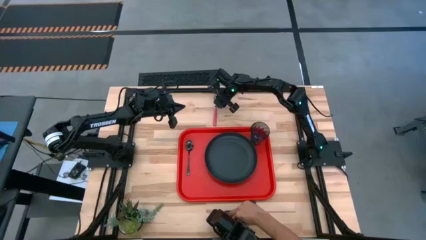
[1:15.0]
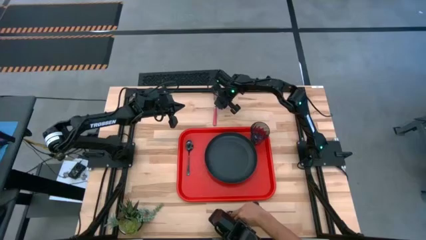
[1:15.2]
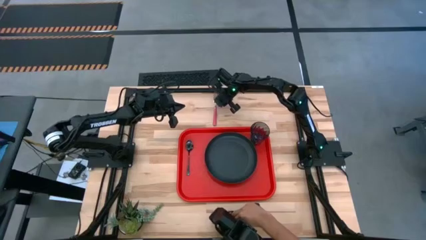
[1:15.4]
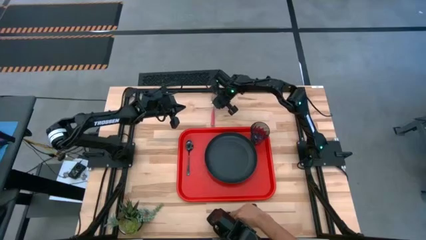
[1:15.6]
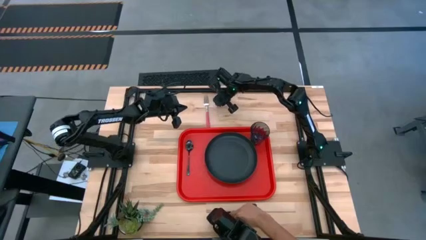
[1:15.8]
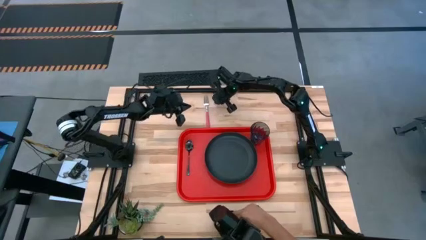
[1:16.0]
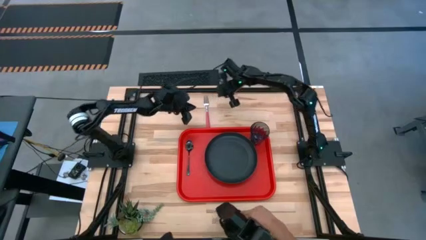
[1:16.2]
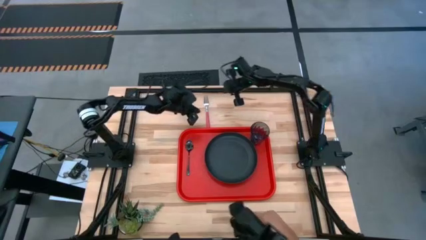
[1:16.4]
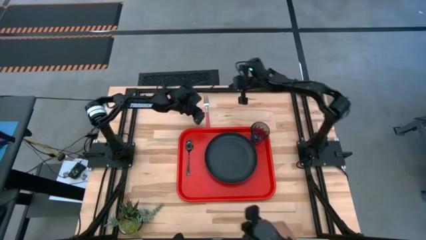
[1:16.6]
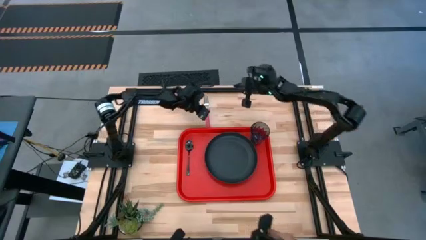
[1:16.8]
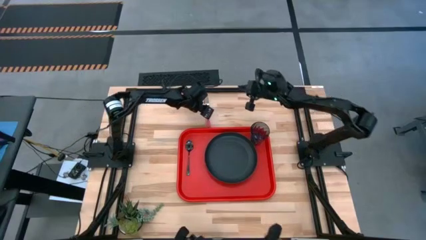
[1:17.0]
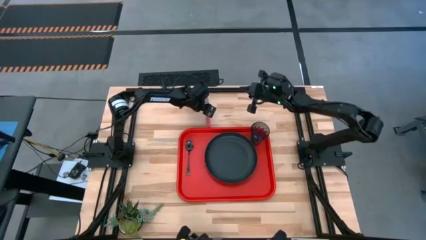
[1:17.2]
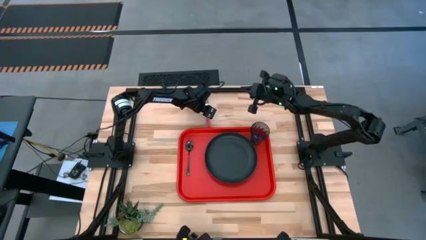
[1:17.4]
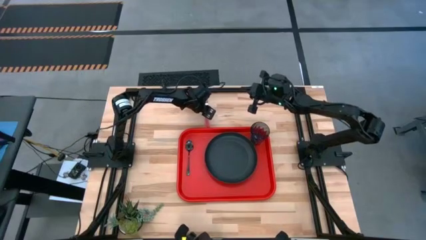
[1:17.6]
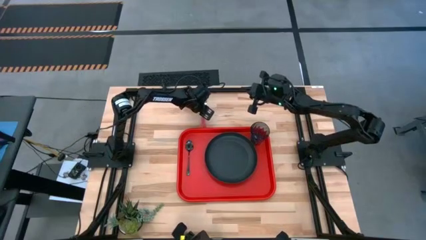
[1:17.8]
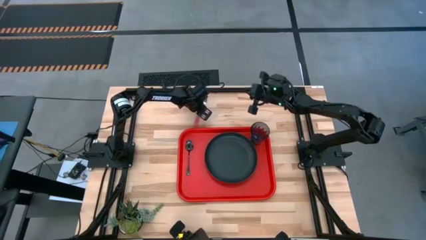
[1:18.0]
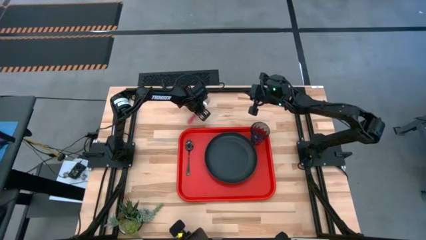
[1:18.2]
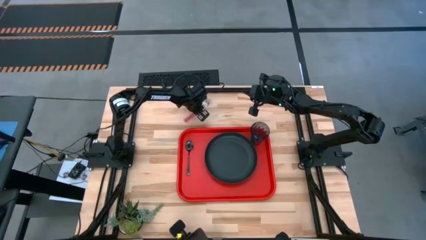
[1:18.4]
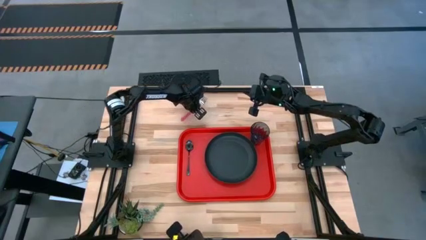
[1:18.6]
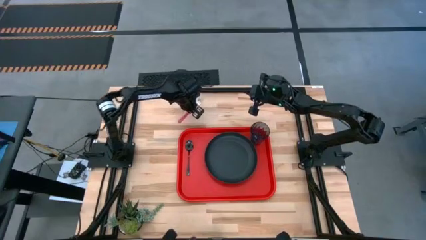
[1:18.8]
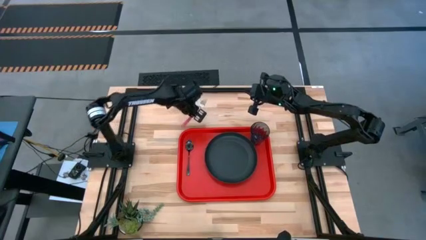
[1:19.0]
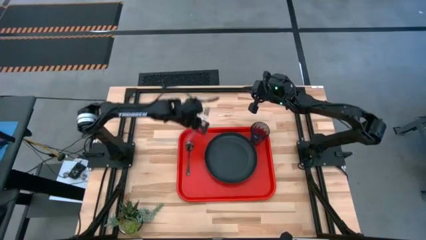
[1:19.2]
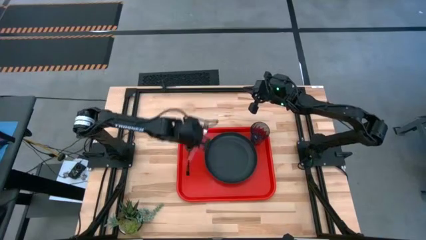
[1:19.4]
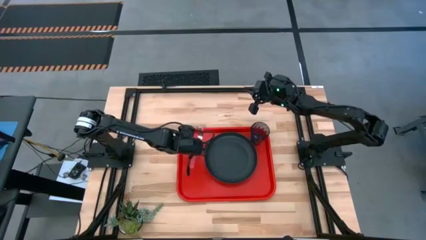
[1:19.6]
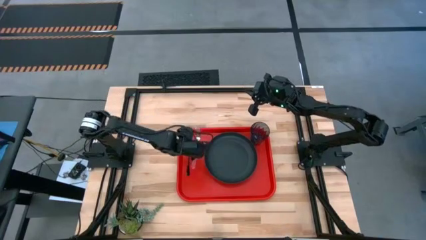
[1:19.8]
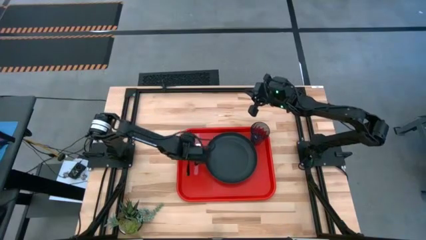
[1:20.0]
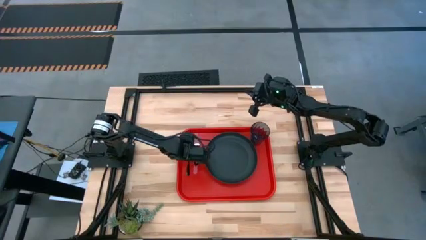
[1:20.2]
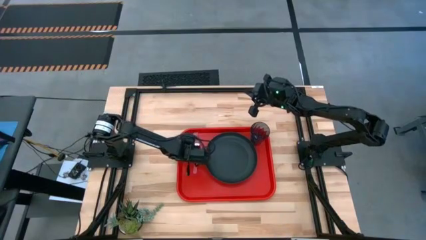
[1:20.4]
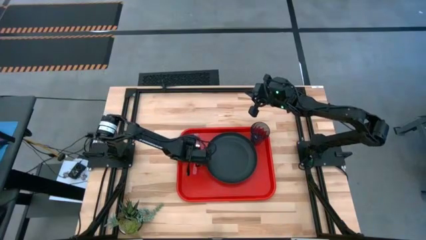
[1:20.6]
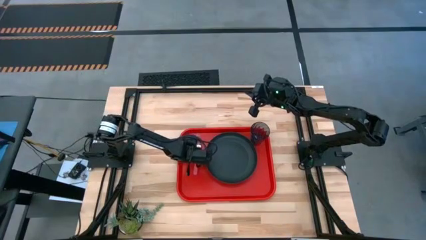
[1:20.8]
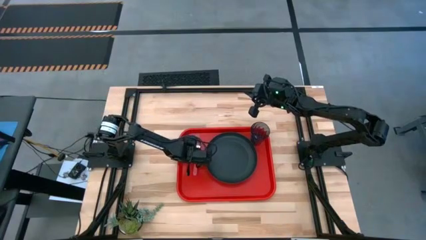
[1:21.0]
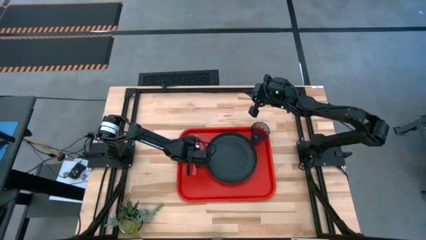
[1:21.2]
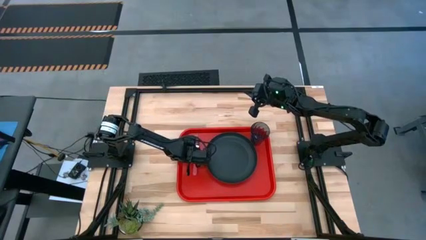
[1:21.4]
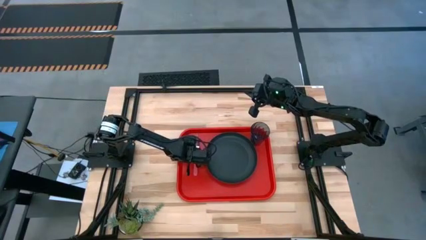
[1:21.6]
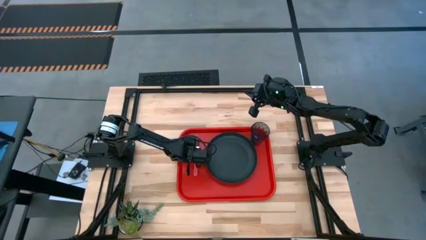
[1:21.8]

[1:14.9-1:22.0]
Task: Pick and place plate/cup/fork/spoon on tray
Put the pink fork on the red serving tray to the left of the black plate

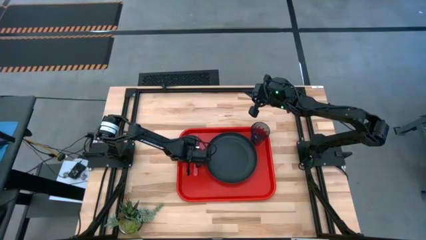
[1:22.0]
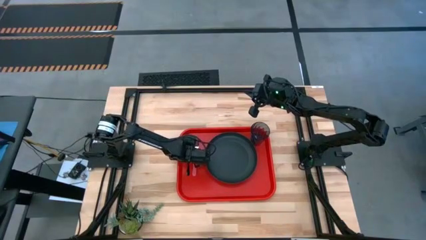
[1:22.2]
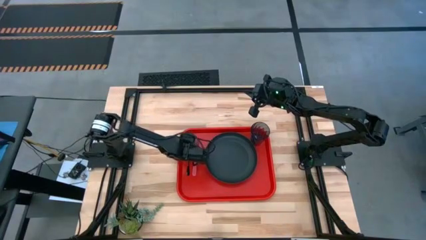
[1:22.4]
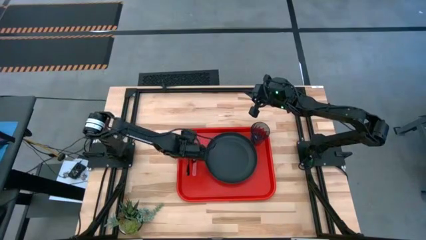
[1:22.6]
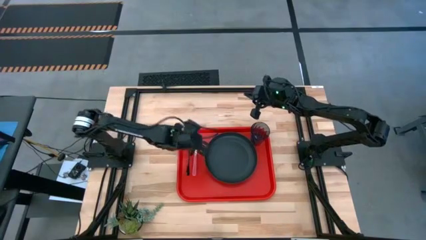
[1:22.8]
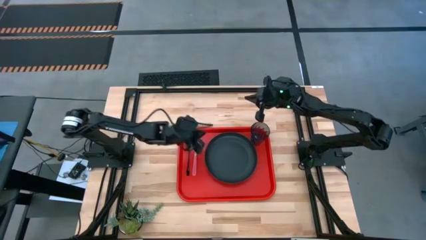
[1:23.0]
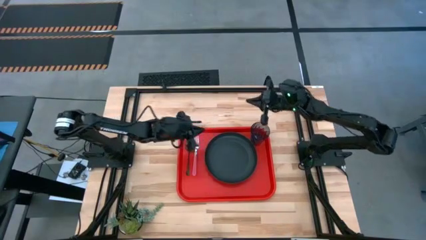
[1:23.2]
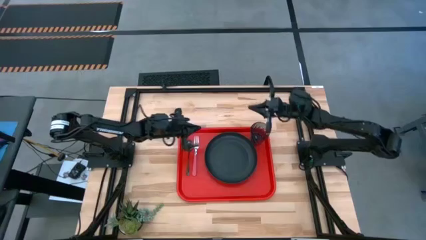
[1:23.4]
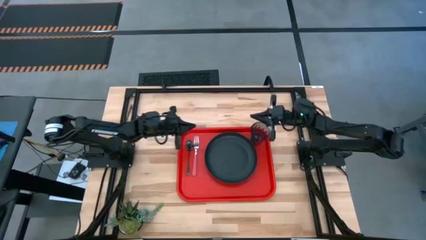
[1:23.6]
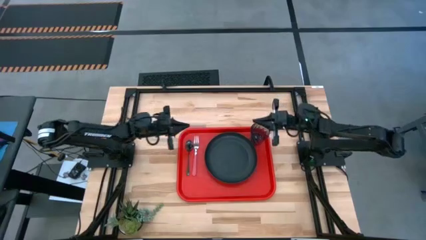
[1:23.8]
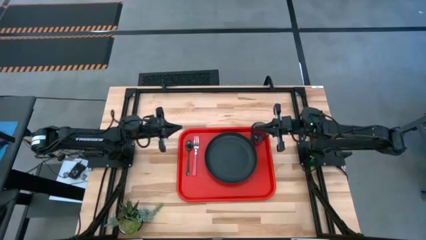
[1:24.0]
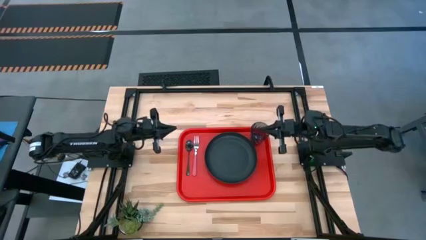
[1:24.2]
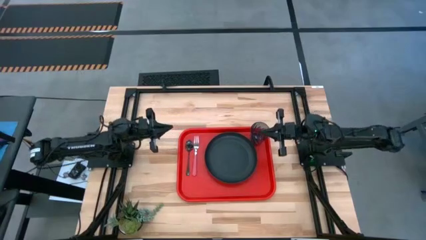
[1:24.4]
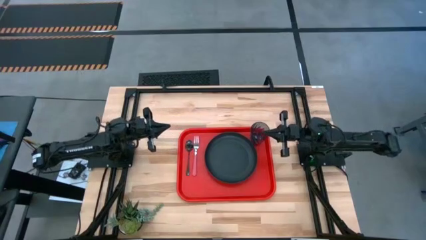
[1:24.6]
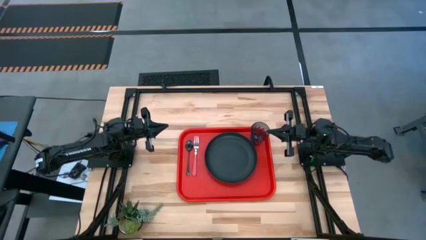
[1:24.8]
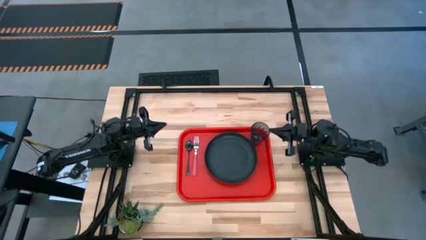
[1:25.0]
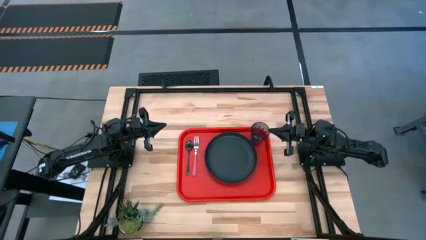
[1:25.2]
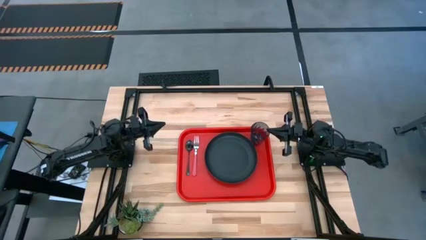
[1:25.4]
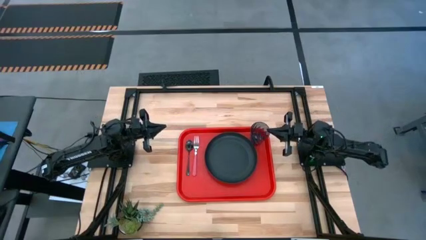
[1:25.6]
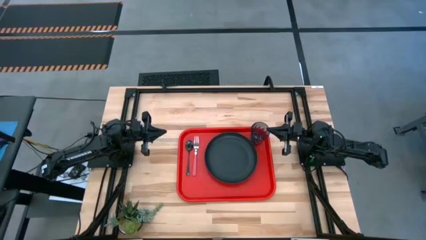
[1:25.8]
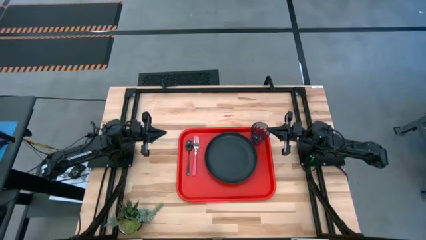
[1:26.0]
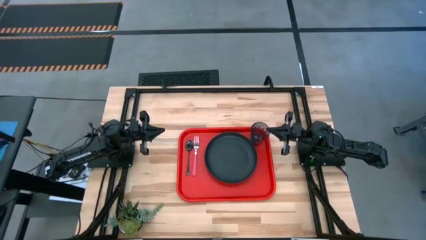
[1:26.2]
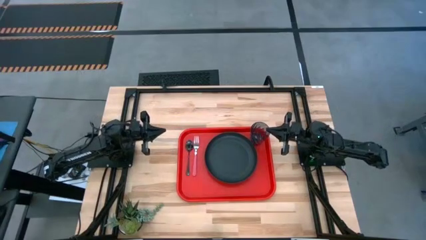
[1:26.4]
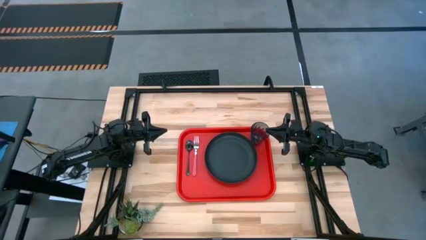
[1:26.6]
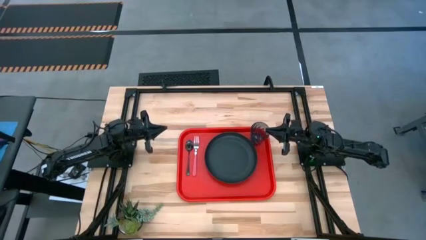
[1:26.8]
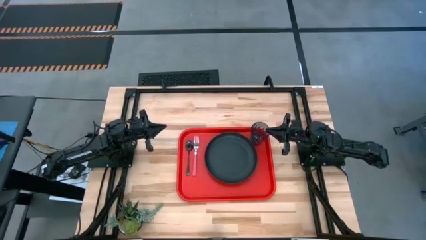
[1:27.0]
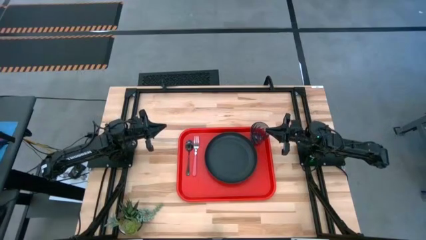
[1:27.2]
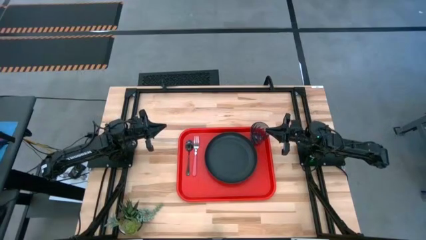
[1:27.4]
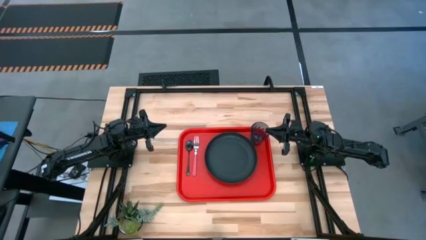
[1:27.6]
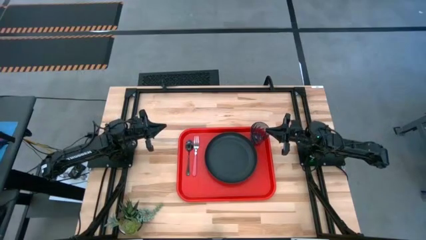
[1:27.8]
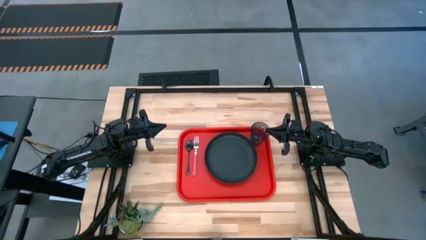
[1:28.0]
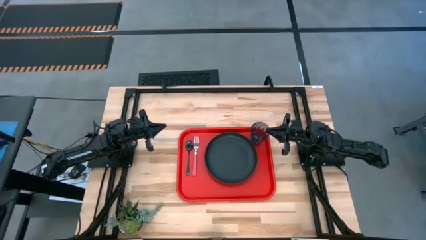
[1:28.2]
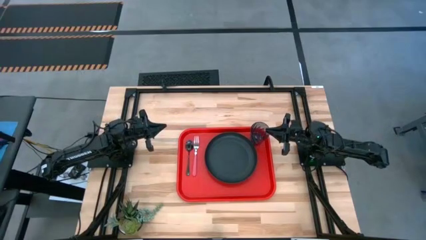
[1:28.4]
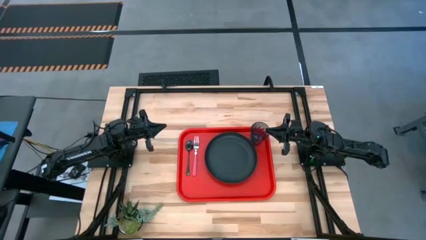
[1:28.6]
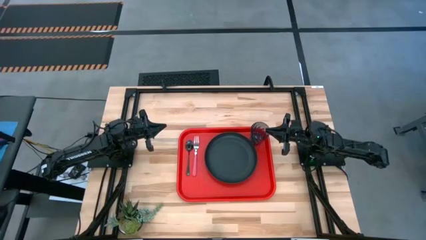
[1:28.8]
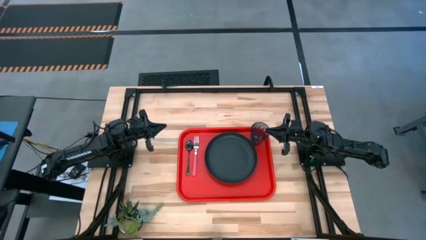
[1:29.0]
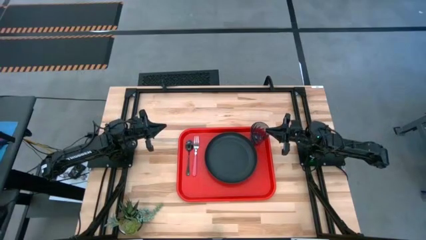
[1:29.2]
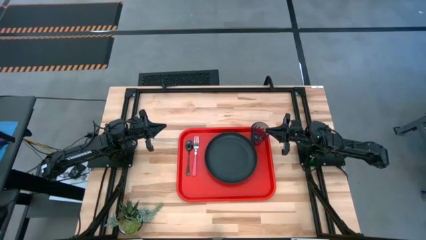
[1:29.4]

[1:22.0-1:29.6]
Return to Home Position
